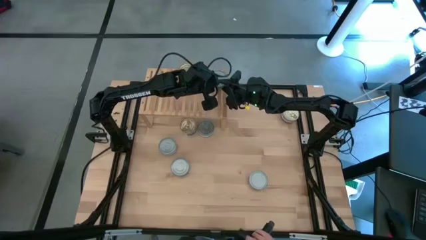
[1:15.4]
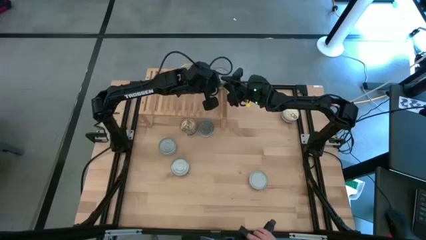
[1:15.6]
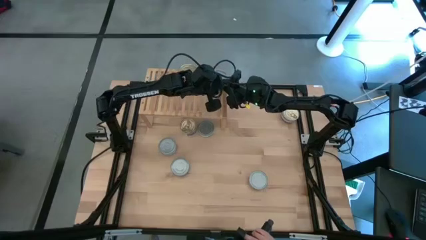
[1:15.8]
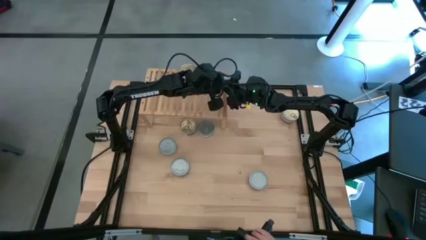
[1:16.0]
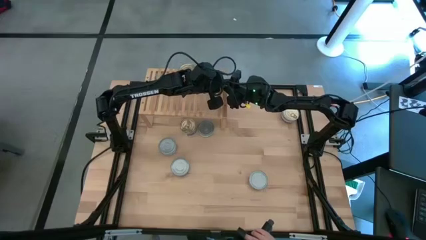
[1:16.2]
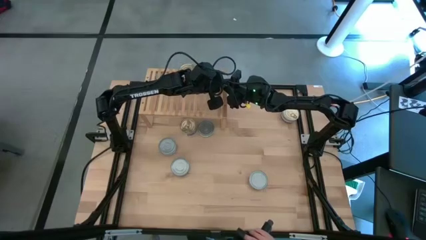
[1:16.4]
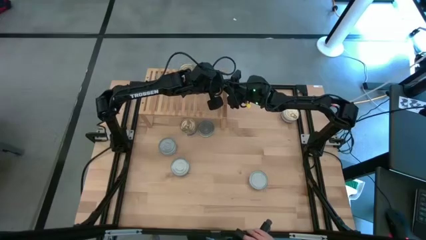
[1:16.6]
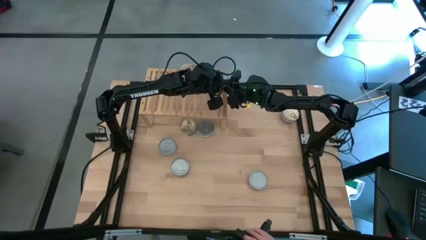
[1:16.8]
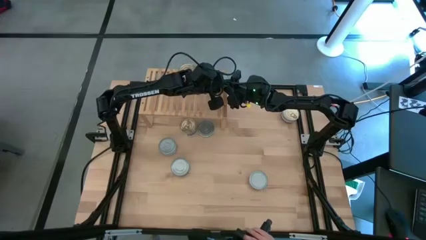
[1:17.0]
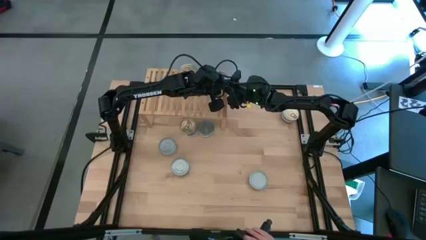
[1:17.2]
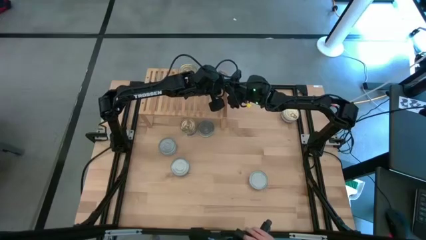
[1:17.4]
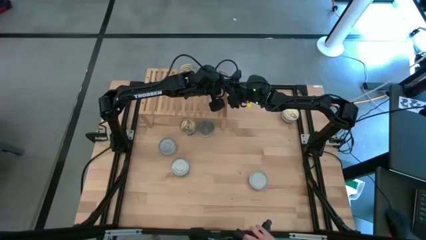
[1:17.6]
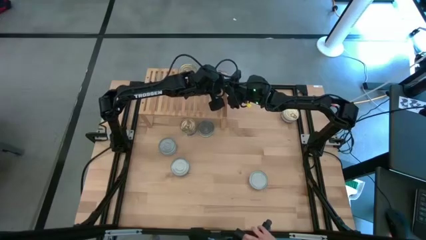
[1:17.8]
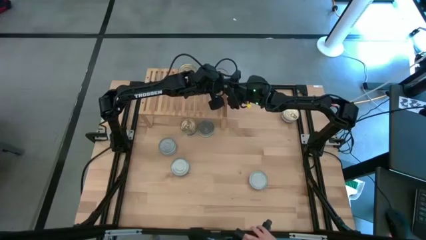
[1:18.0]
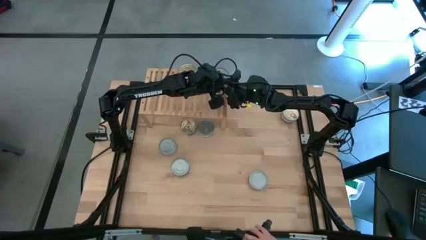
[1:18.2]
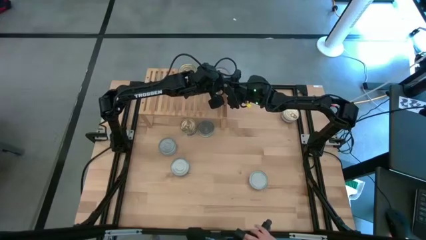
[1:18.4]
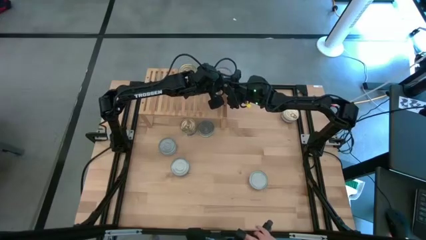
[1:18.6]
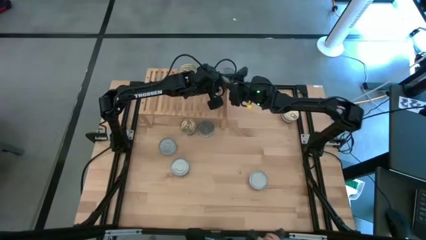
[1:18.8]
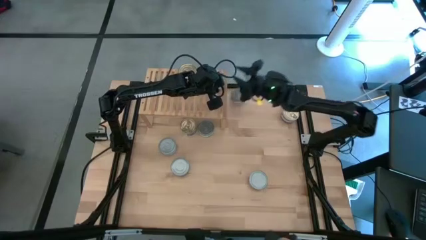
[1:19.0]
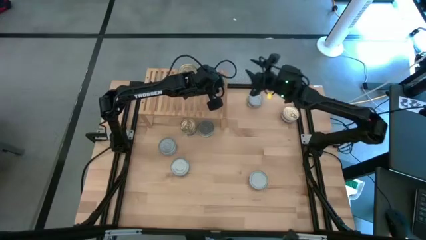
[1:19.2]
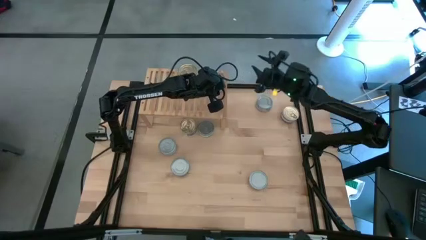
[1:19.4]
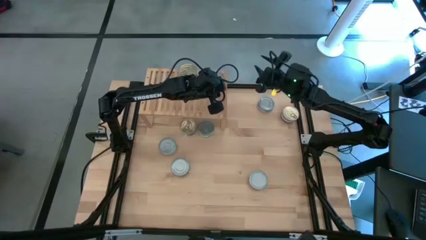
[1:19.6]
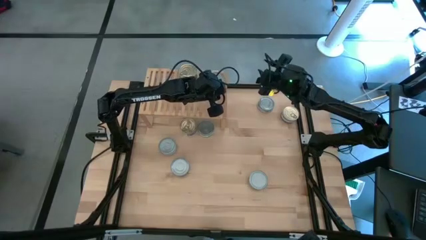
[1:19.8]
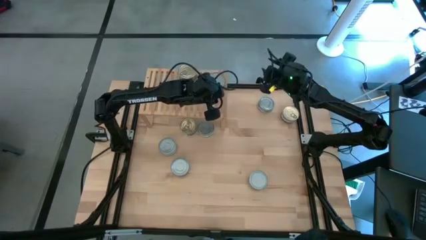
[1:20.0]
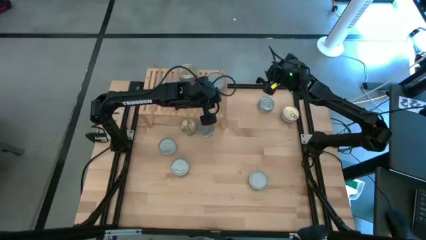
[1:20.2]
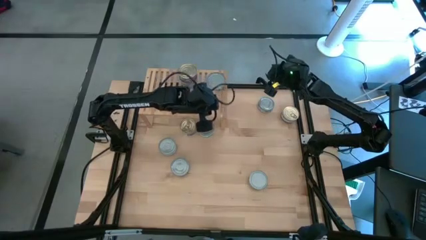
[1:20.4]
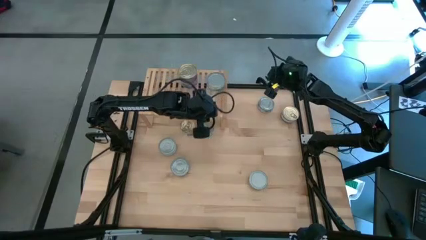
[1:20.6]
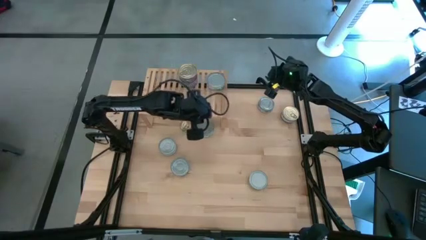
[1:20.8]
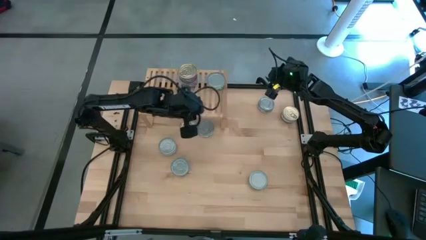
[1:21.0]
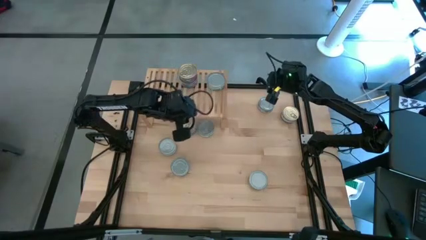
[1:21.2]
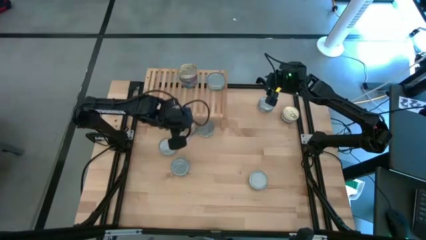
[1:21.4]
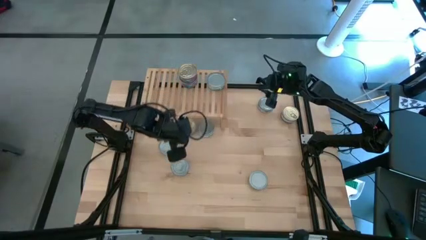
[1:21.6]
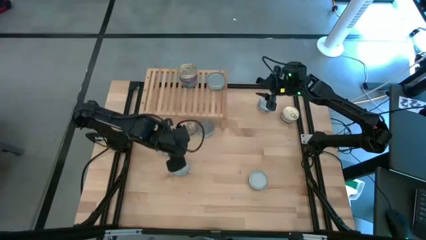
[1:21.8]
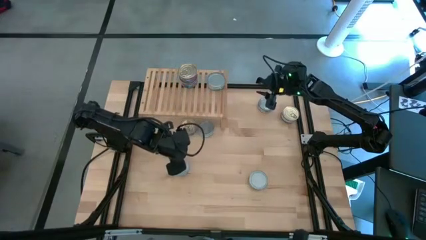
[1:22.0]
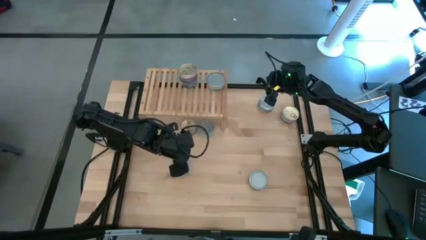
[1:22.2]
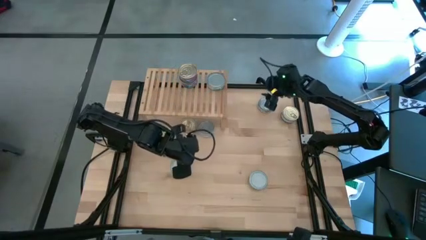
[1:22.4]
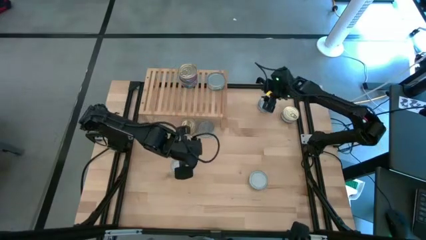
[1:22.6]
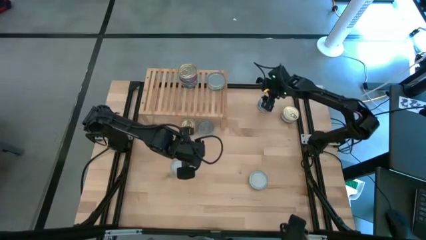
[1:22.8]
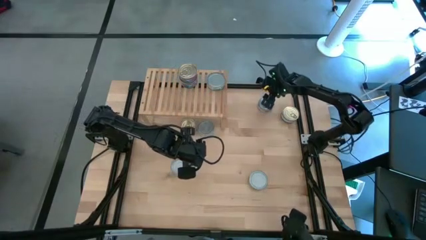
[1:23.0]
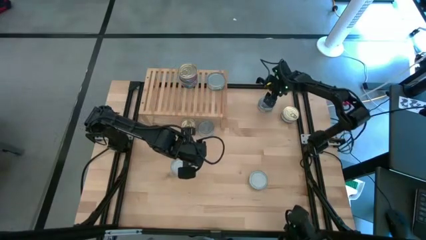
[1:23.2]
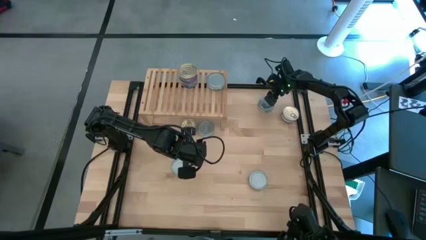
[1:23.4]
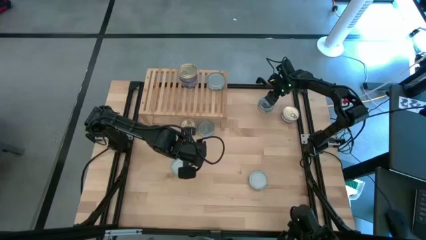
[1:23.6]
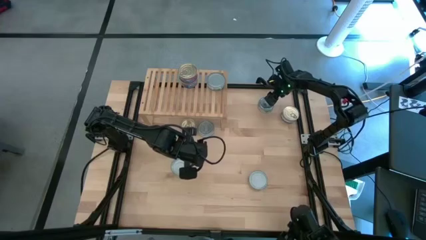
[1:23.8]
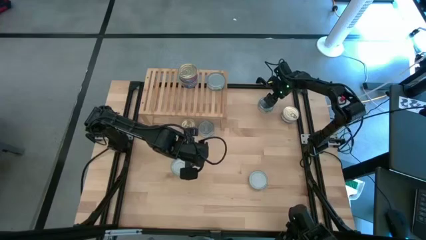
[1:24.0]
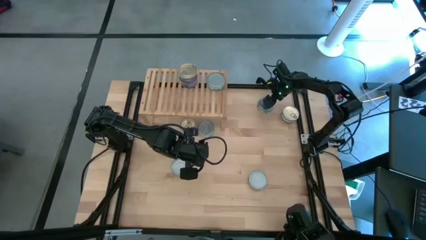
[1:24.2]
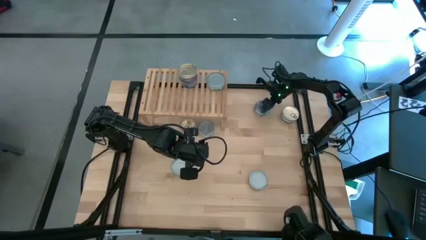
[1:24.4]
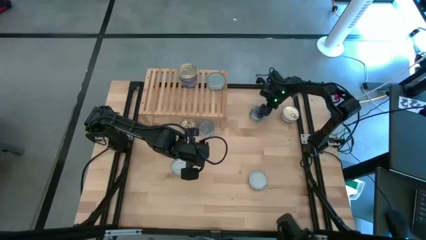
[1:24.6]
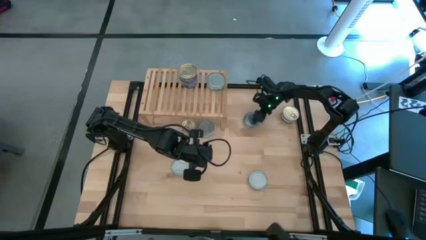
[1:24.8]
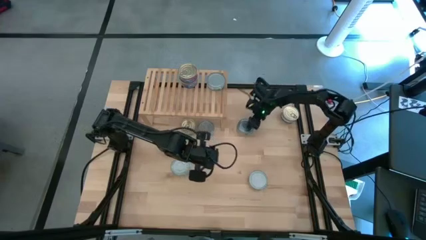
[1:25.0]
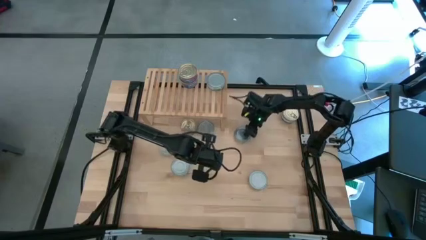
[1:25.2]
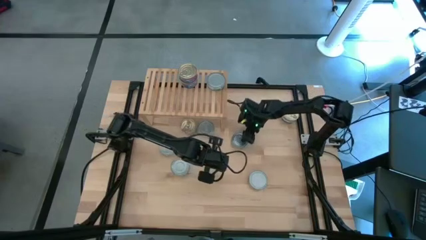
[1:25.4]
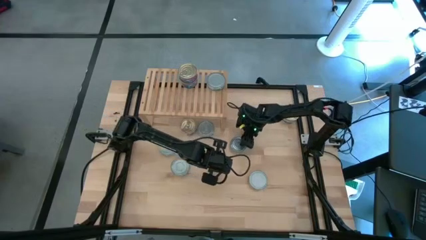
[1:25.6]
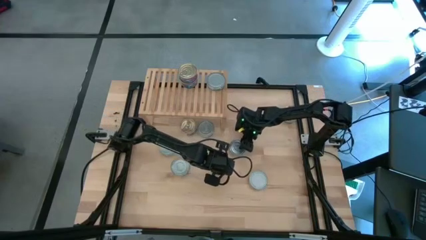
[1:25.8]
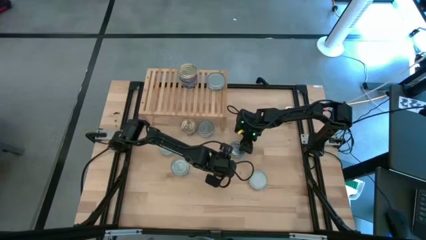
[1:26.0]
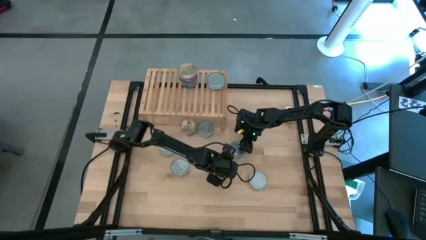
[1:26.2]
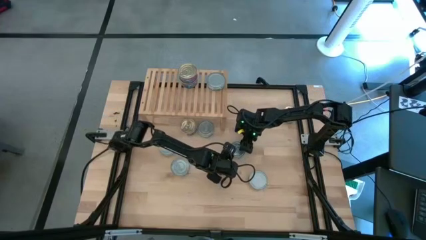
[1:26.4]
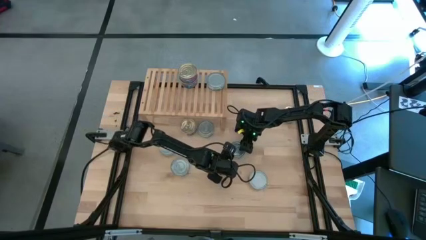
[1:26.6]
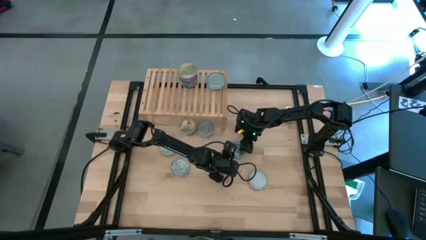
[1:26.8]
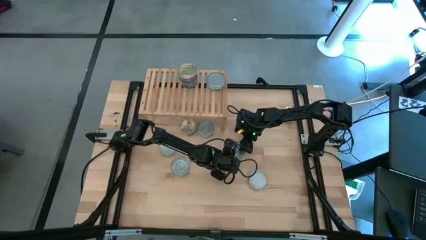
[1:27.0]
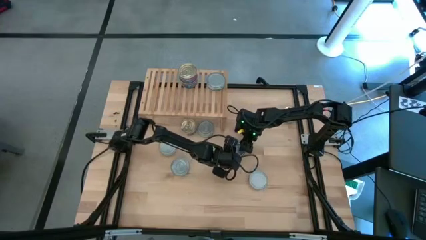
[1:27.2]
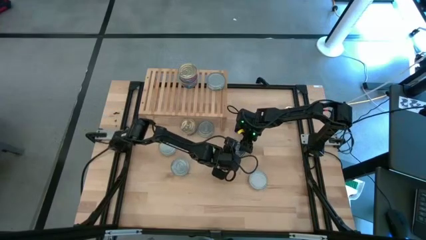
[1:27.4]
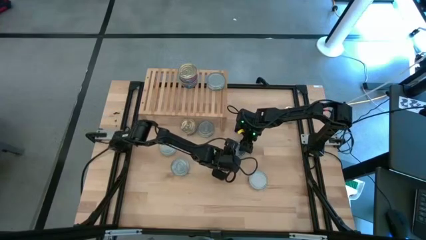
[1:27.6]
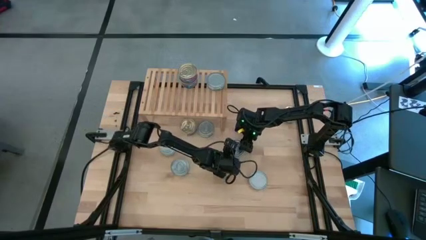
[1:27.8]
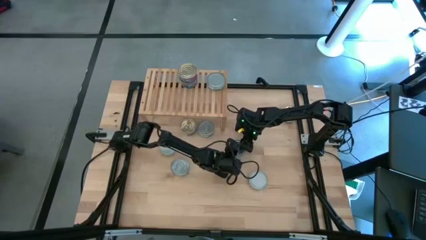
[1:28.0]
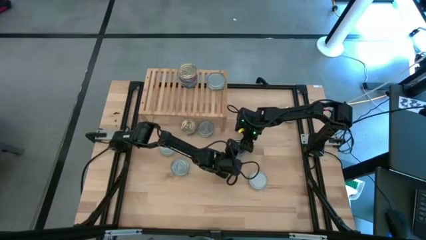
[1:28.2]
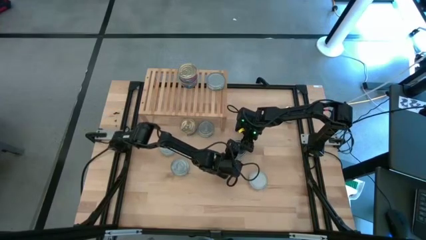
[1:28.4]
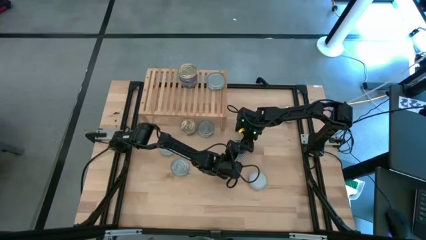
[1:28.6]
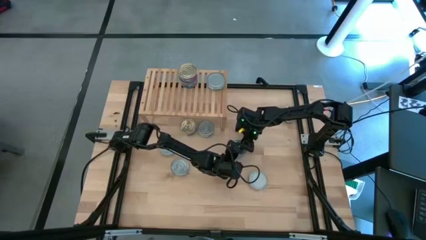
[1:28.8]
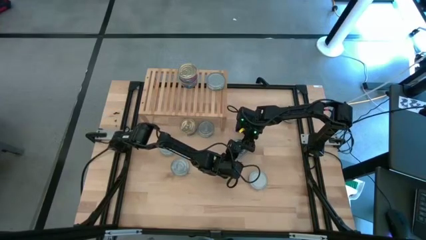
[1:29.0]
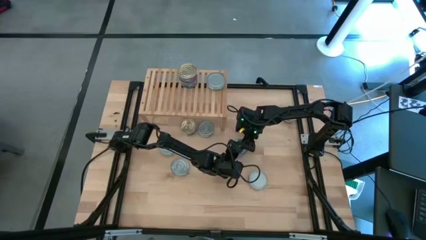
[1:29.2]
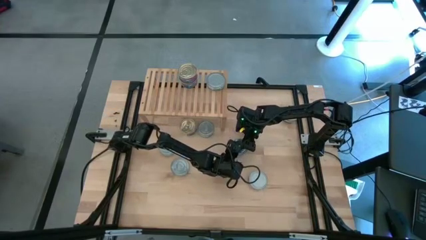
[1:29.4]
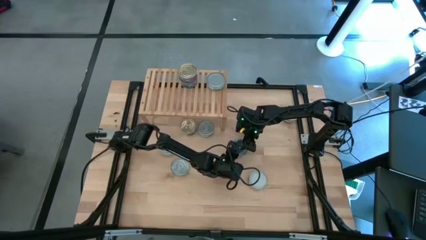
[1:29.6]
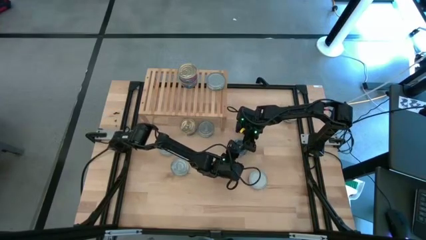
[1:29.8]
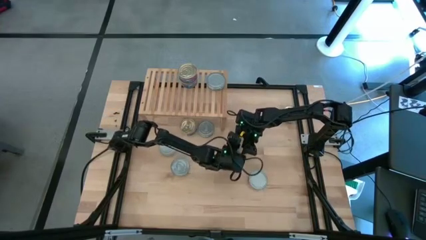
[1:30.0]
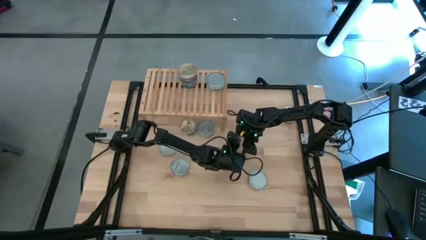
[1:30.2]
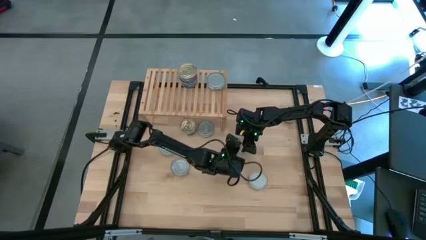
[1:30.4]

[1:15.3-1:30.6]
Task: Stack canned seafood by type on shelf
Stack the green tuna can on top of the green tuna can on the shelf

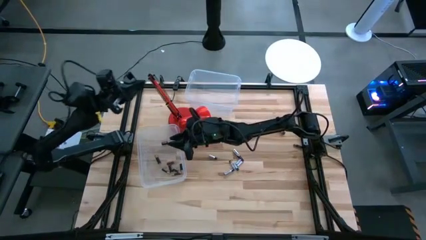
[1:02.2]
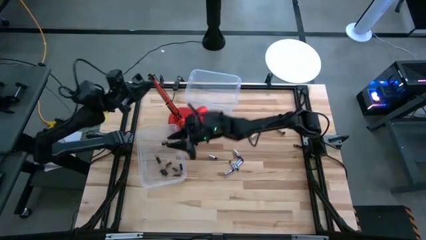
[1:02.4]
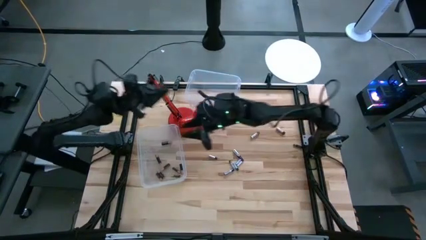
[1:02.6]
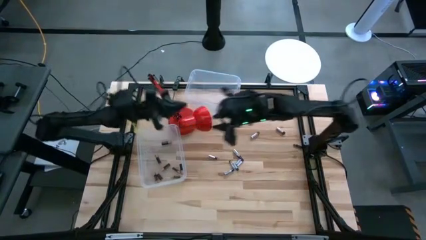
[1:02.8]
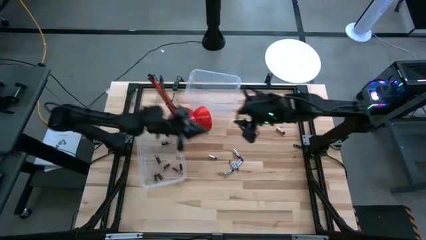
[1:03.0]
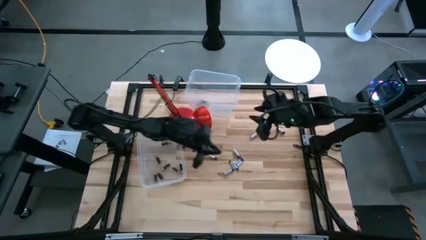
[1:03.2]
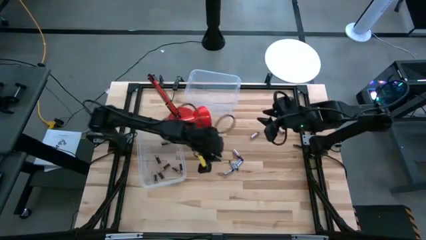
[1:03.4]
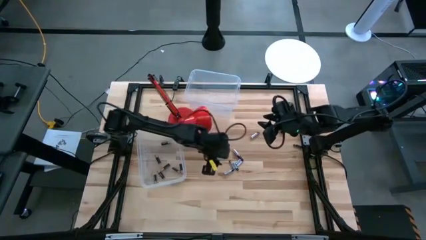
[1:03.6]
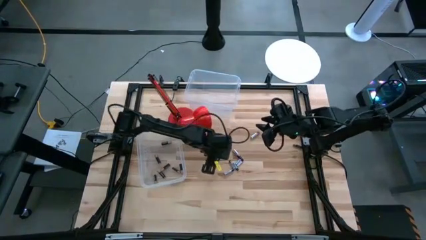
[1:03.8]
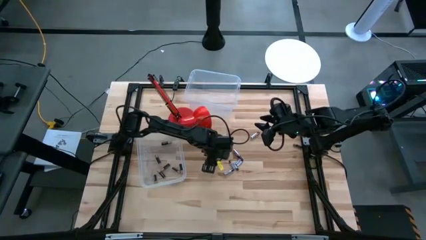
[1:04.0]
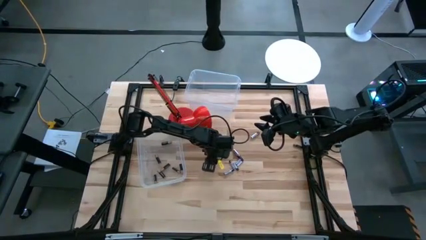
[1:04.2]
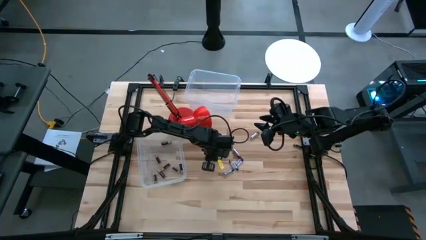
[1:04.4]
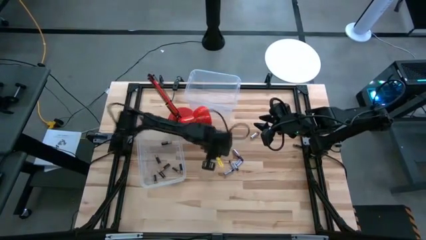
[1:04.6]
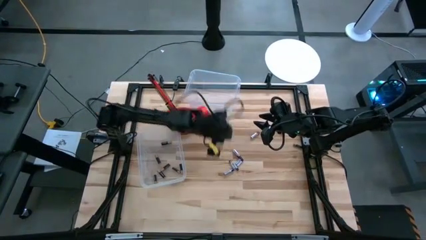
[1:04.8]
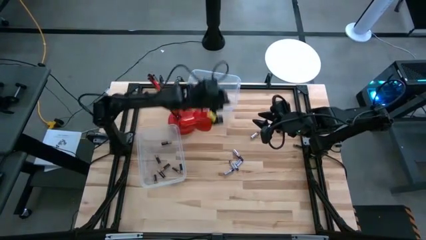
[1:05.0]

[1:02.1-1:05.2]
Task: Sort batteries
Put the white battery into the top transparent bin
